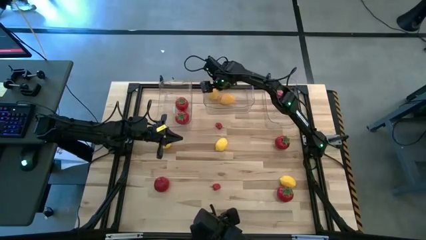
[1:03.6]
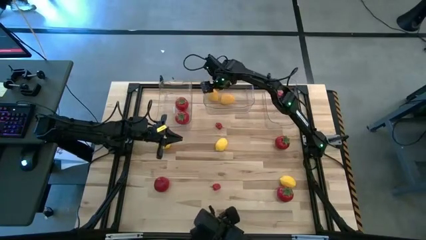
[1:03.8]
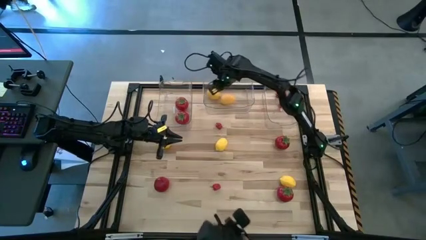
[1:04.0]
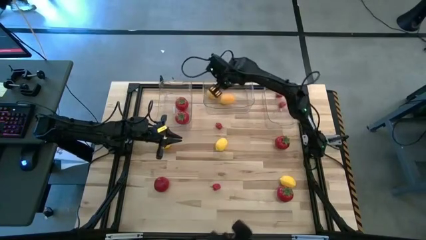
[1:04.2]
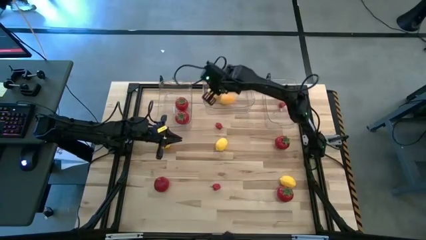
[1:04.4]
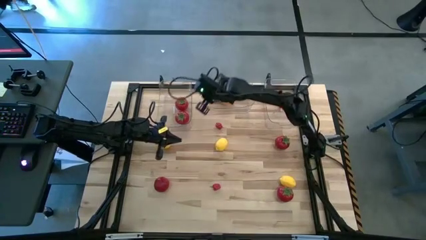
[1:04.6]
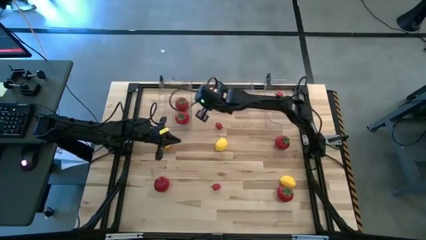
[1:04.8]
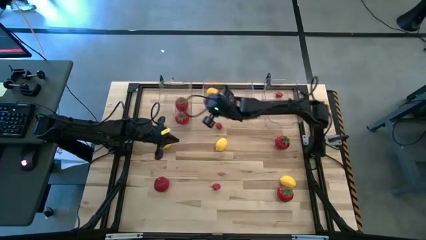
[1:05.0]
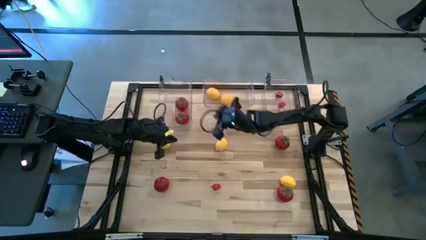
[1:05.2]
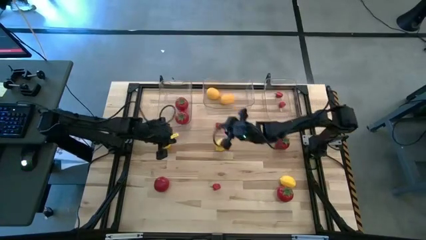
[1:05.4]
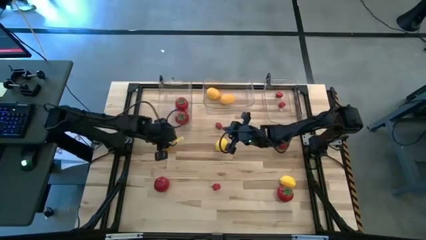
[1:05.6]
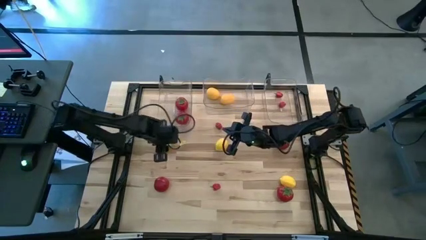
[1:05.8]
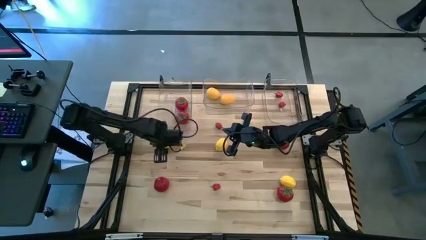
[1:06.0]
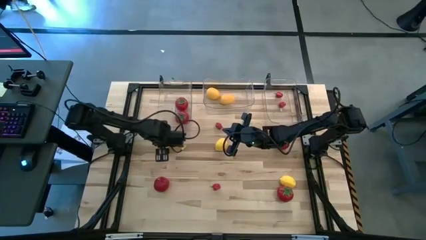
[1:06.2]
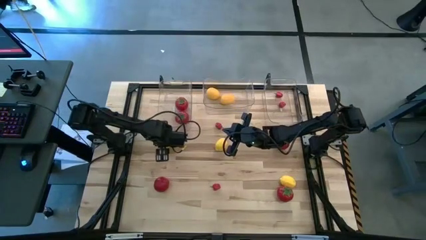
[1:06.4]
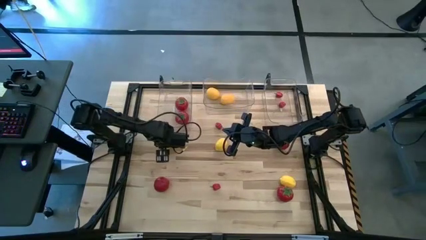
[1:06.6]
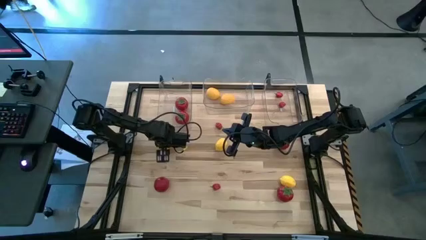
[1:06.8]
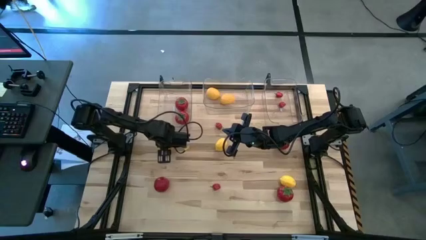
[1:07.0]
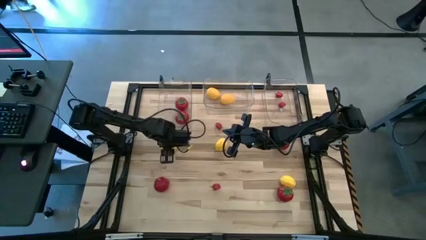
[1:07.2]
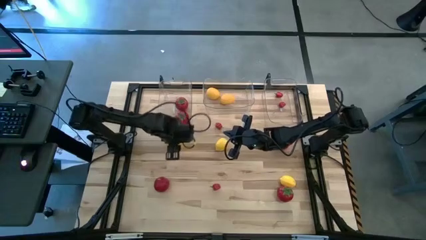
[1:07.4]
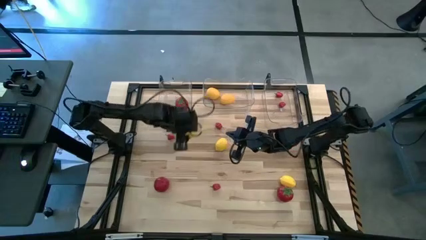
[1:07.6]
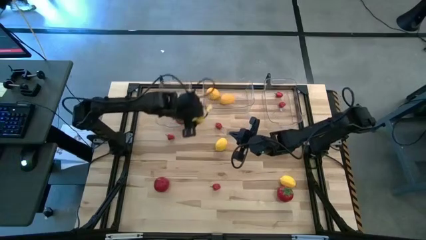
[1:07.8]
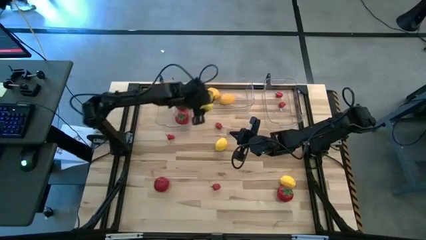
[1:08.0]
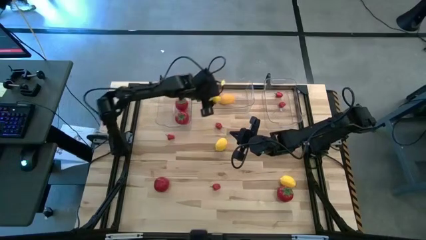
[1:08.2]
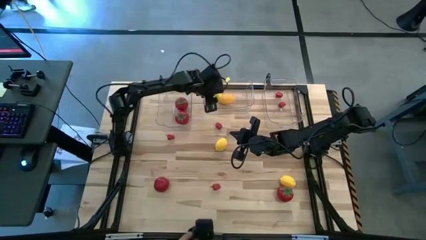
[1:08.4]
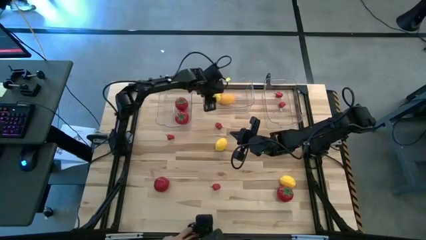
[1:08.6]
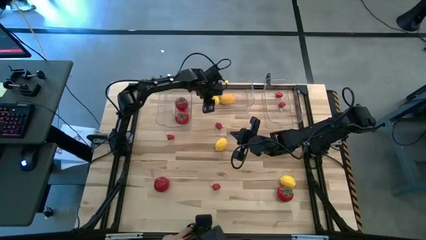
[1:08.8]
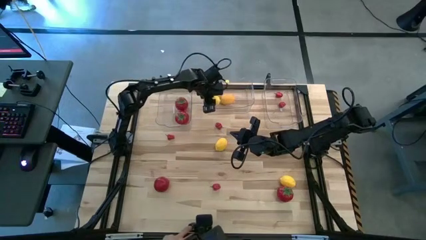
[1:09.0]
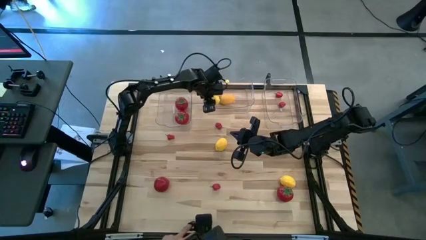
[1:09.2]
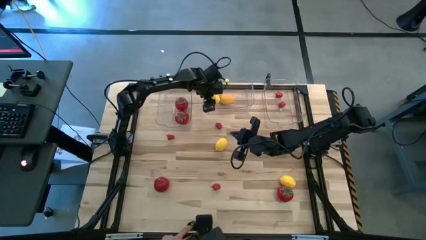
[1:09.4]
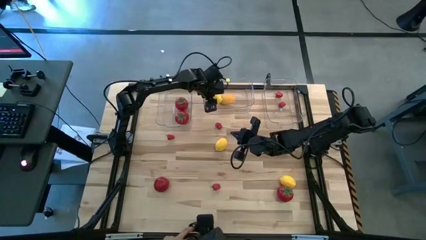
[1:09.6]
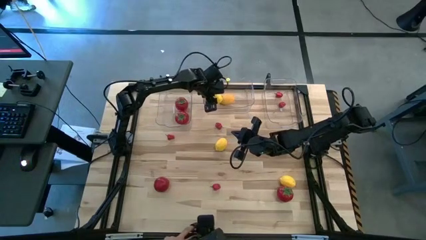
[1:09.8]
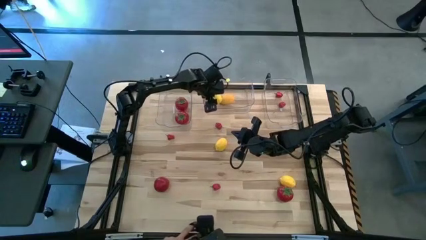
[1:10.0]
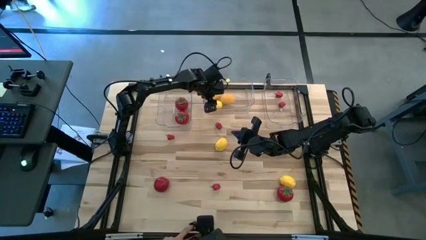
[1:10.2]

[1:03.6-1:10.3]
Task: Sort produce into baskets
Put the yellow lemon into center transparent bin

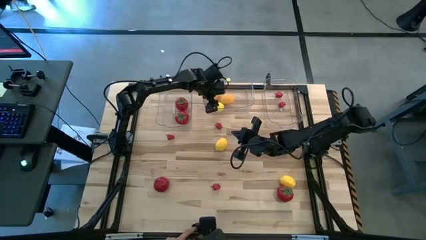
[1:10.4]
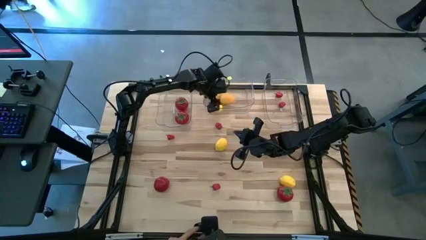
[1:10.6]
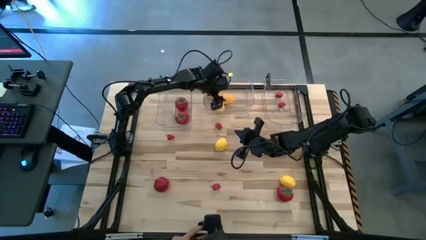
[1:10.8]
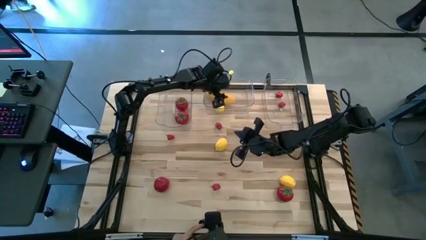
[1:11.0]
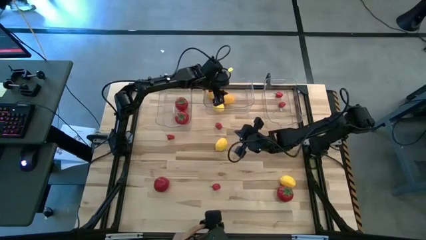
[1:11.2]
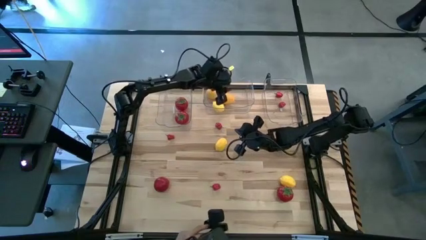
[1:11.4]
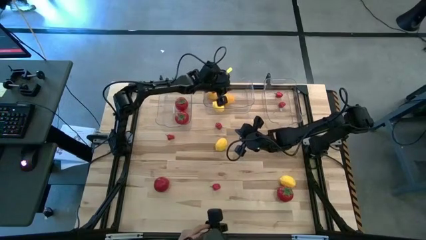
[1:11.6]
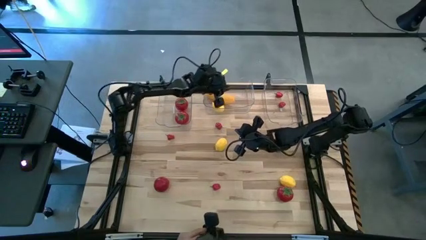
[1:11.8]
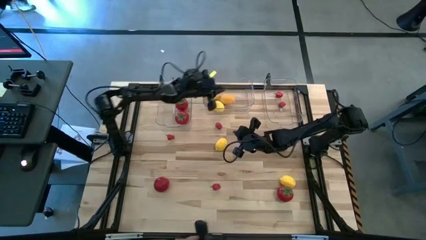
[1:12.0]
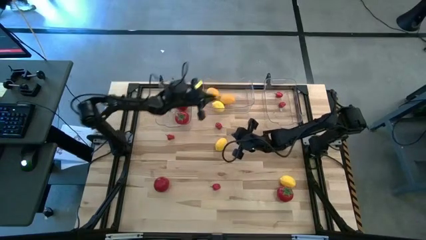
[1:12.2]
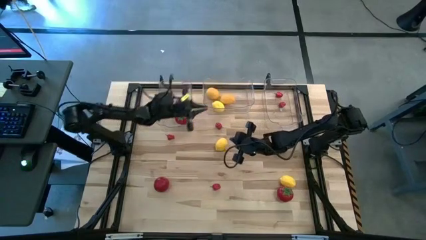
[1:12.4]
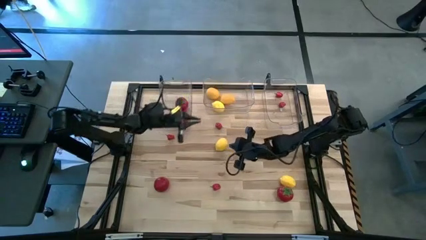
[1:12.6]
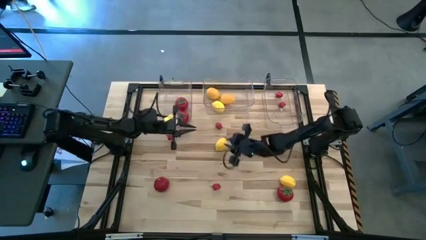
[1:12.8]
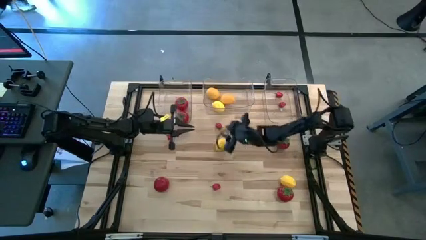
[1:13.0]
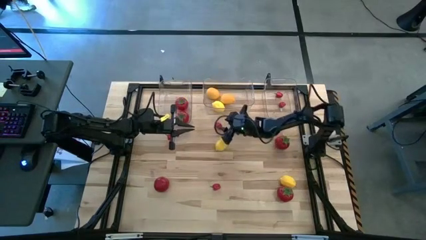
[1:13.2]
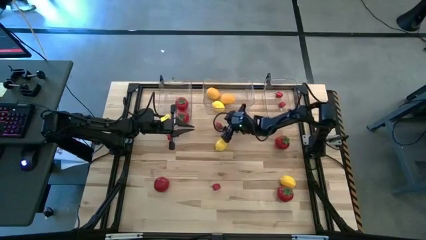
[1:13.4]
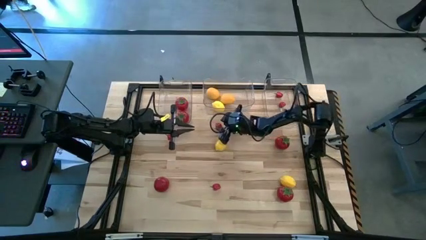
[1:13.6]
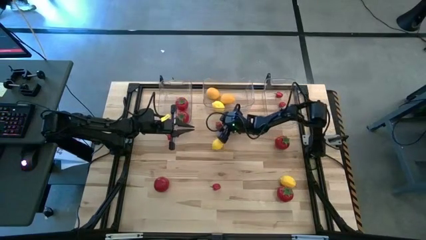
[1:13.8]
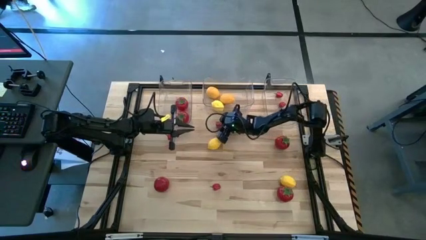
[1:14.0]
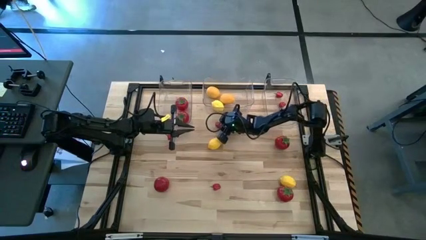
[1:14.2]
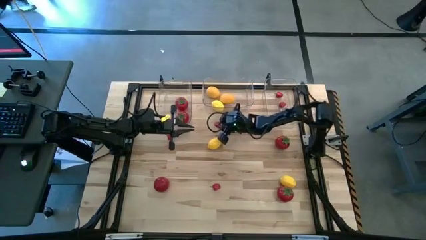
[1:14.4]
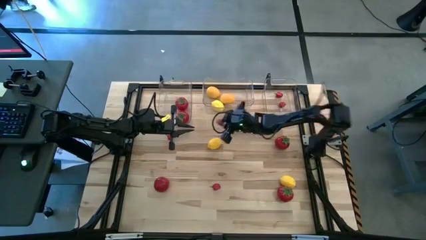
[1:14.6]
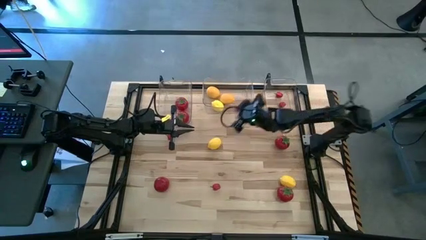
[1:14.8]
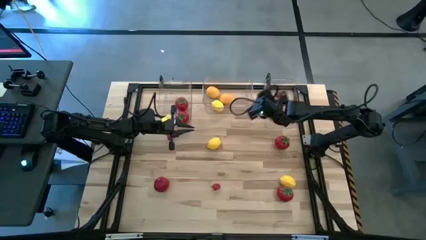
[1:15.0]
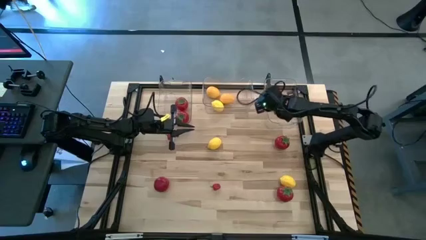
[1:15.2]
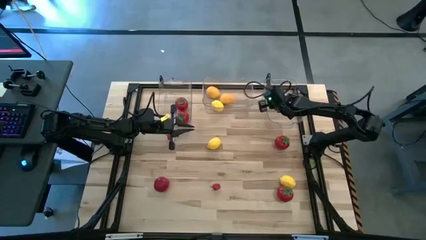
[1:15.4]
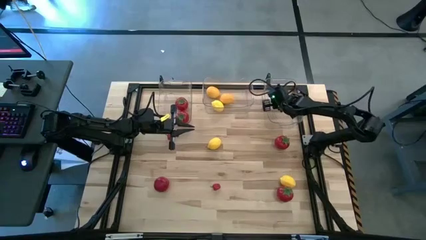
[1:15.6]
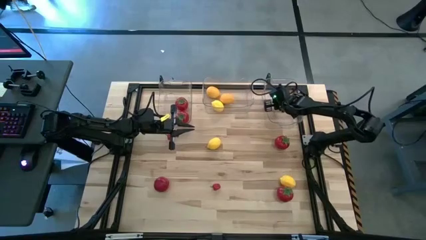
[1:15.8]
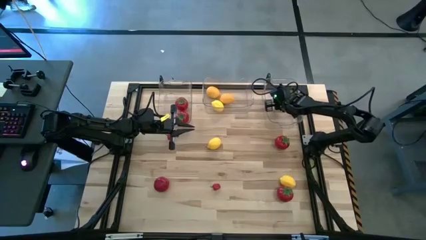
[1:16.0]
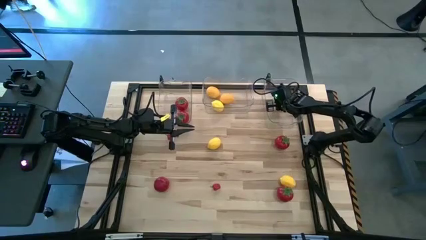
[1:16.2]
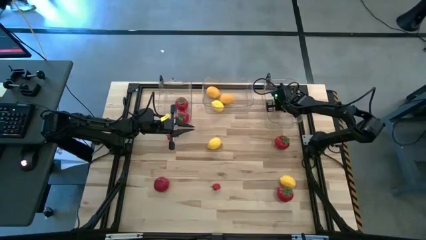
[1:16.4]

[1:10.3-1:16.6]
Put the red chili into the right transparent bin

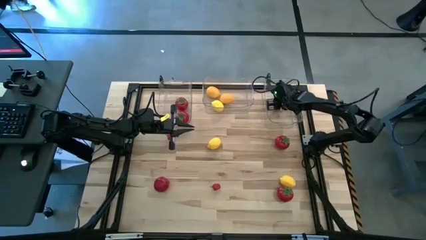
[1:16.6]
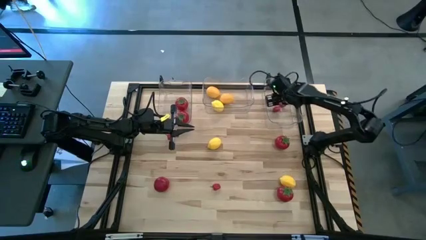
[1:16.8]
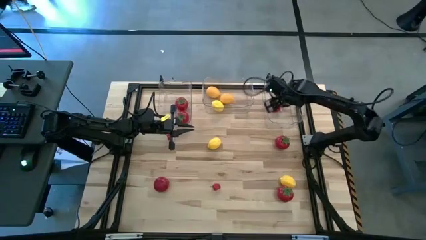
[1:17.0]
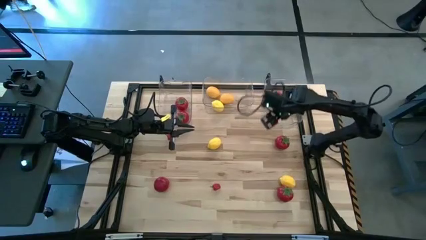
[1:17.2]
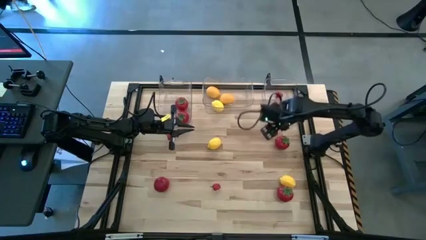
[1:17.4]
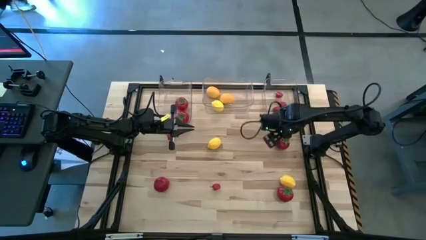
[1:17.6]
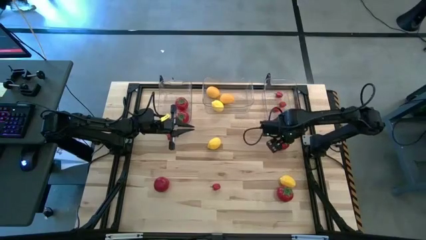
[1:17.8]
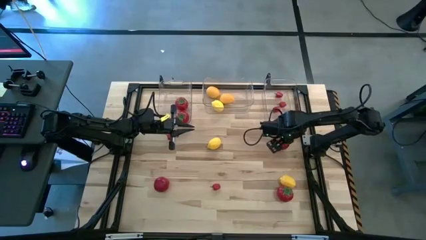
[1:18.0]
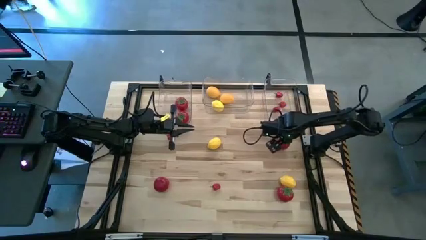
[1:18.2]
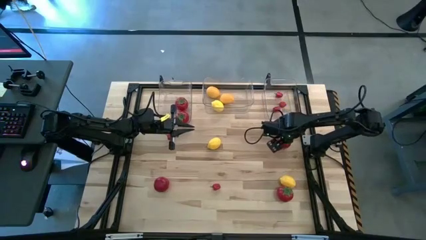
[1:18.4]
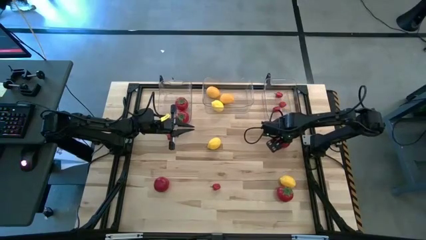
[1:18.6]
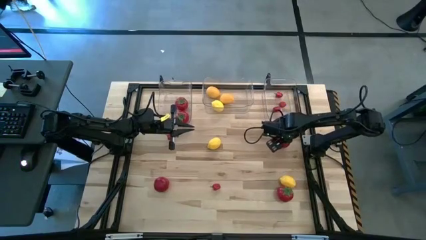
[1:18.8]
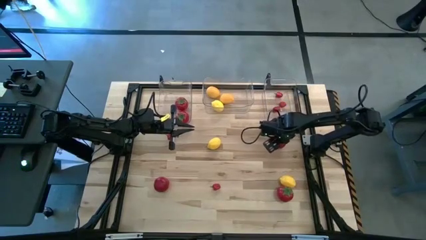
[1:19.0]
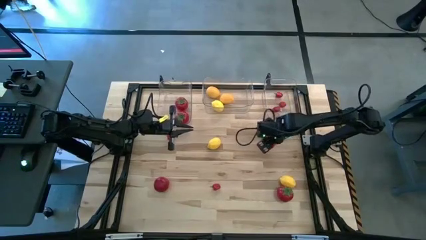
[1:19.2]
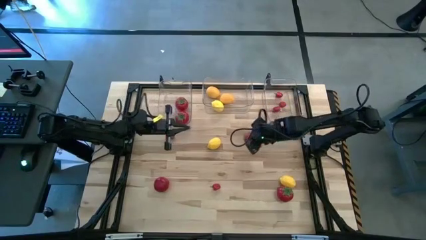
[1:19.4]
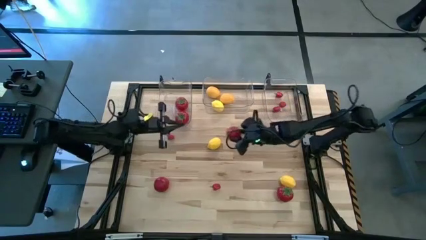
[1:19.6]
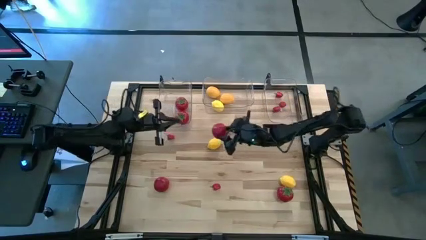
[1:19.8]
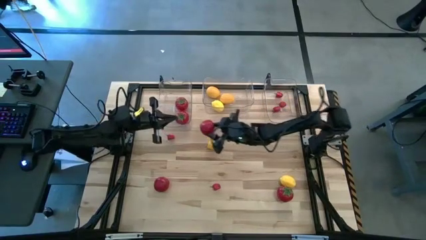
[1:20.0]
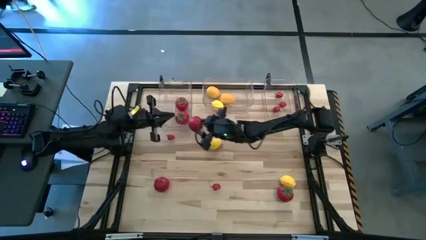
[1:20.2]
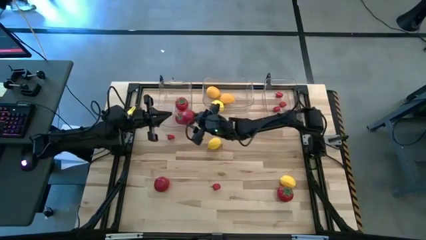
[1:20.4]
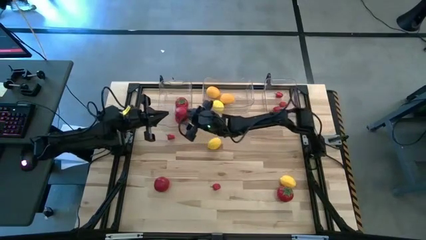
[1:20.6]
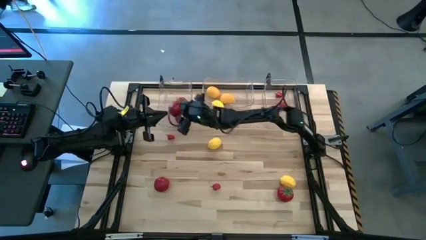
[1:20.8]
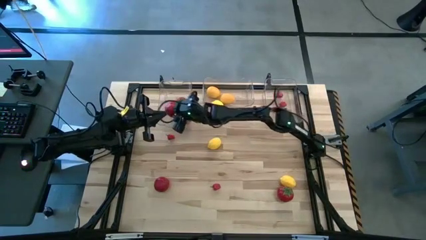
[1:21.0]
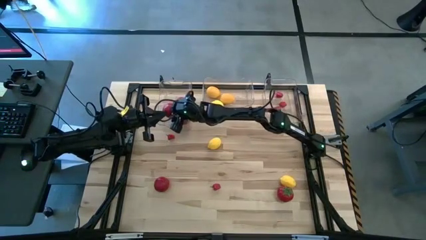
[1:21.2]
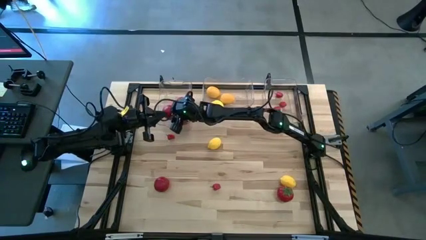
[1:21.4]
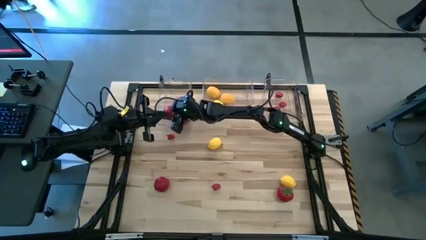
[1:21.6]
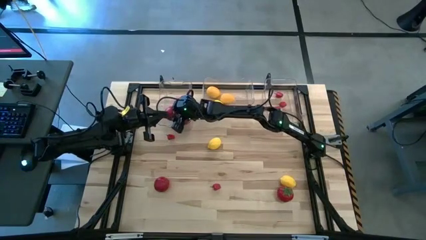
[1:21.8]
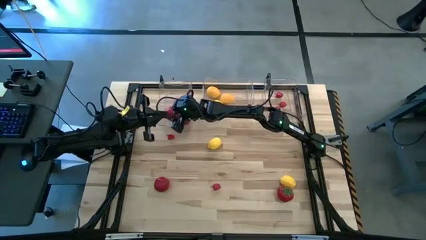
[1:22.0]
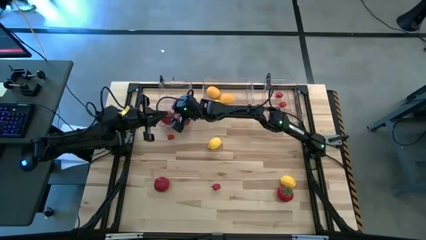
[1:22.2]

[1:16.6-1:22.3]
Put the red tomato into the left transparent bin
